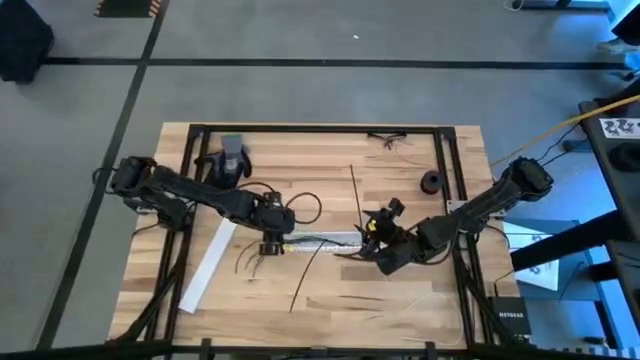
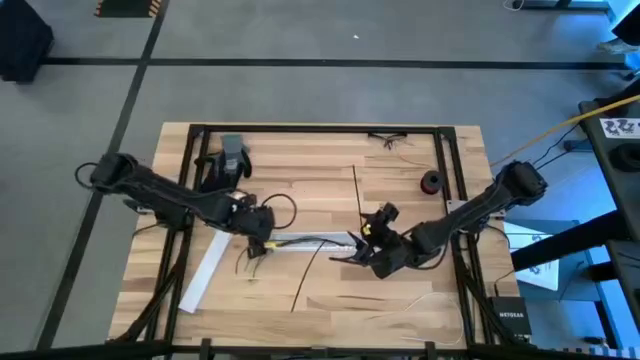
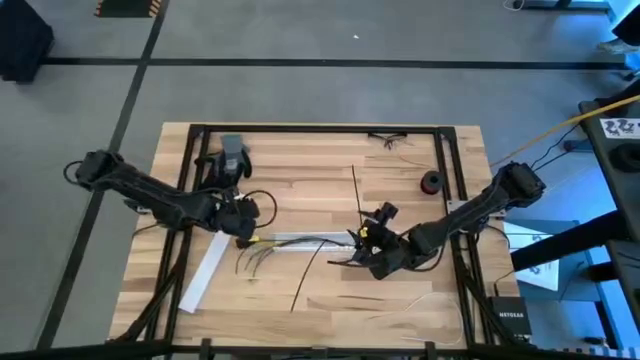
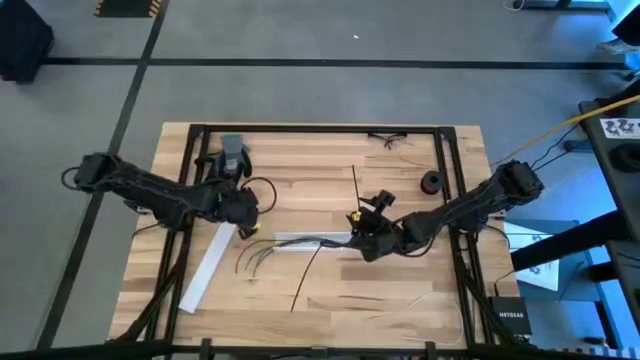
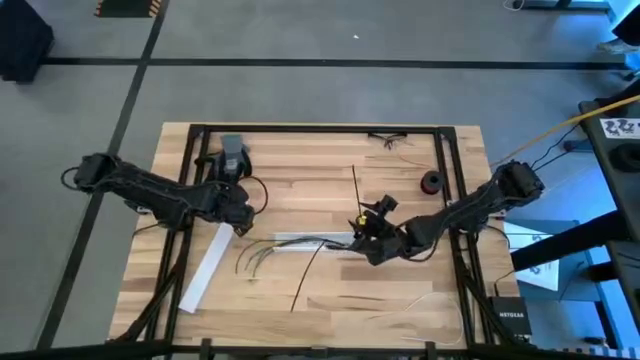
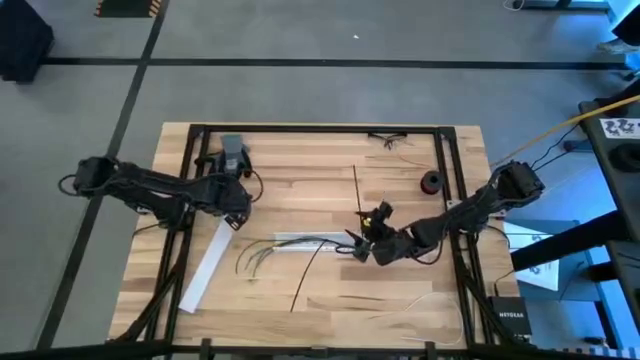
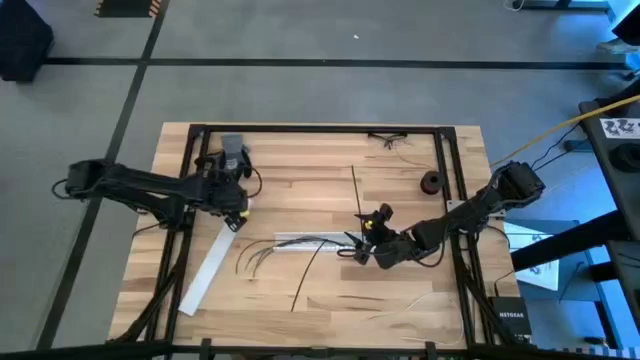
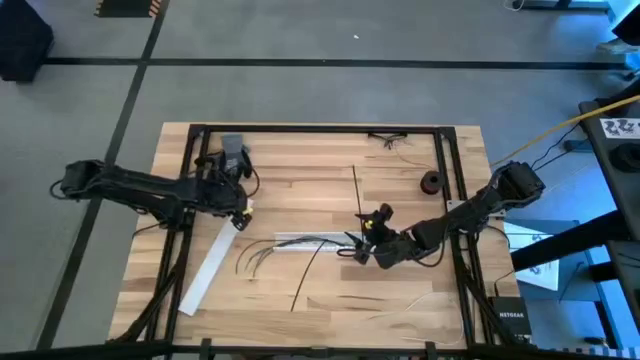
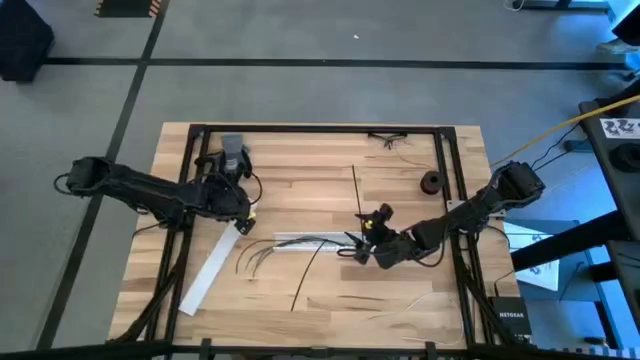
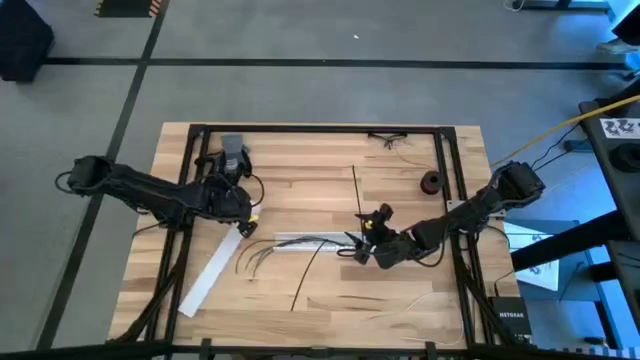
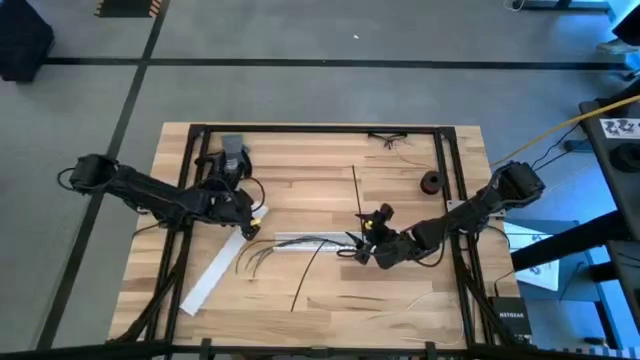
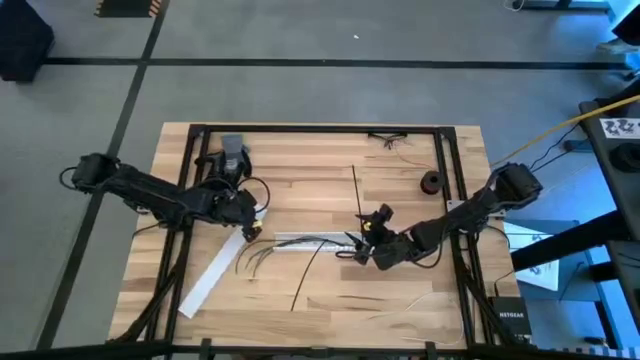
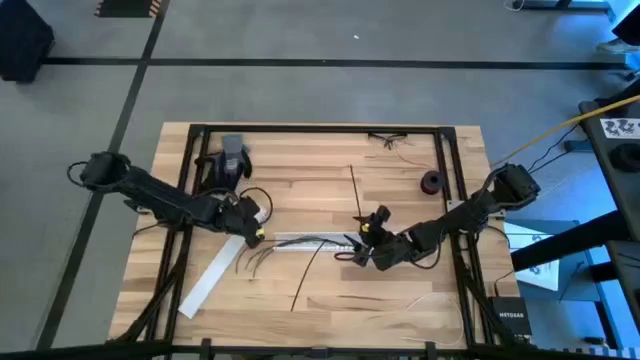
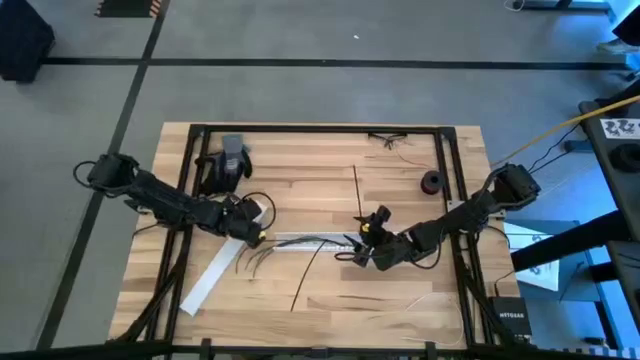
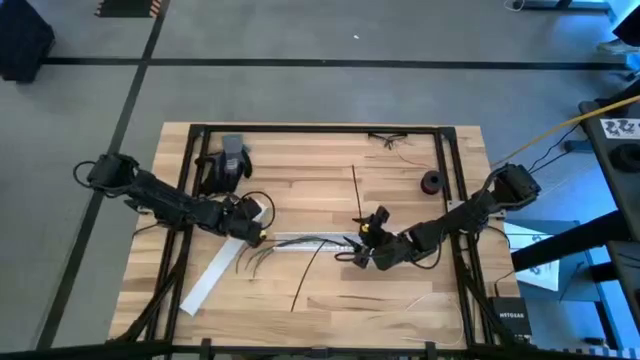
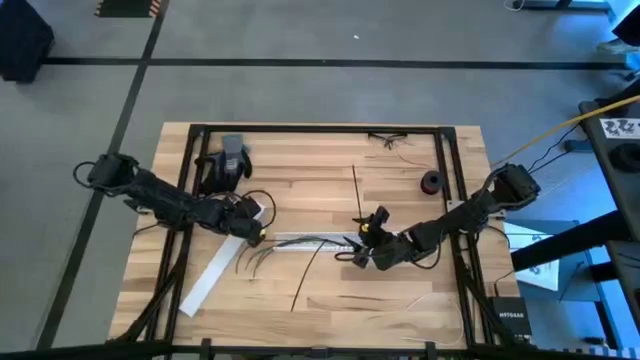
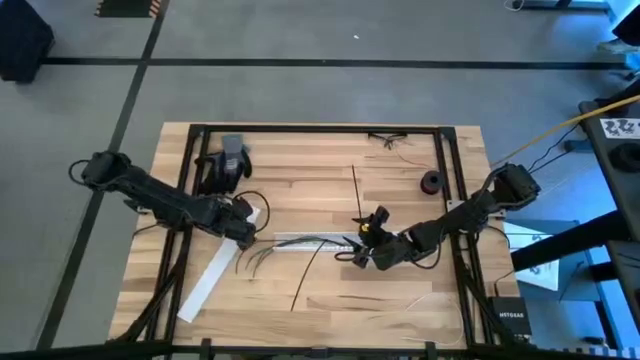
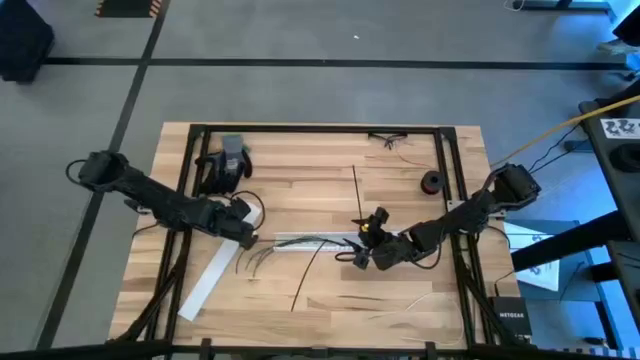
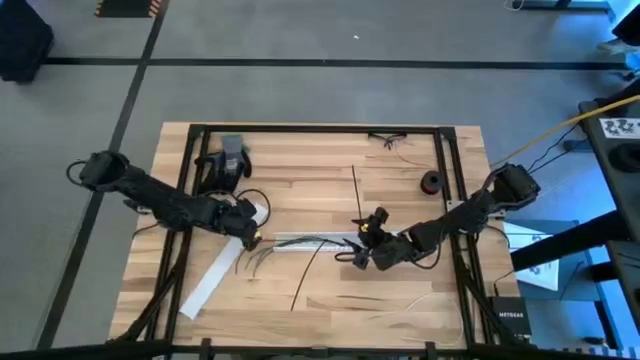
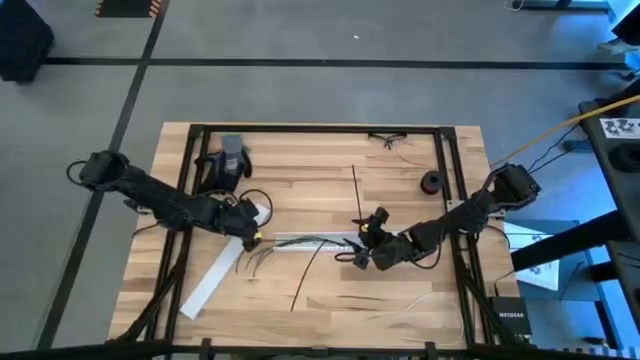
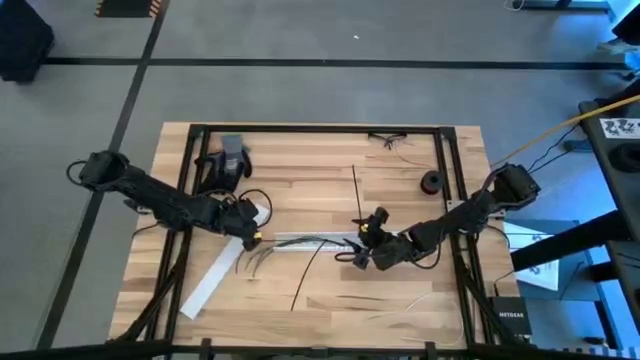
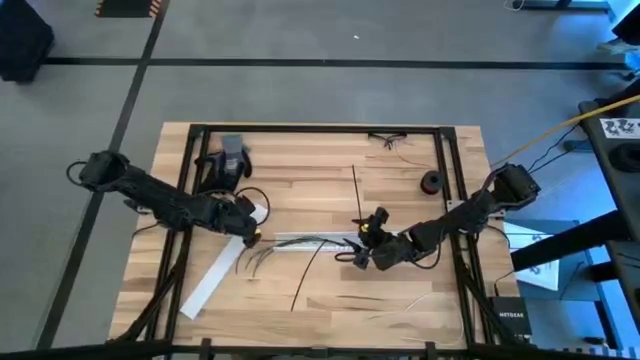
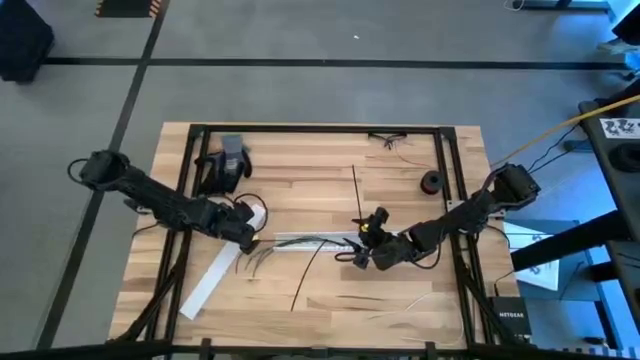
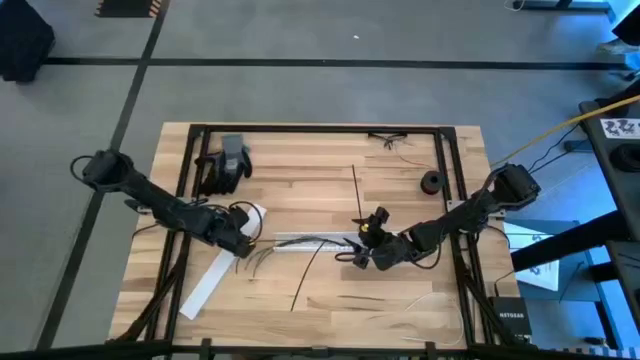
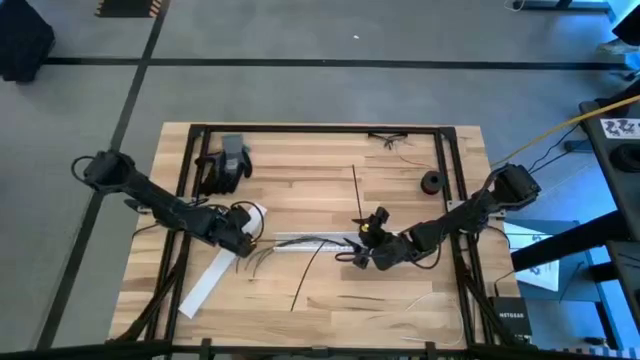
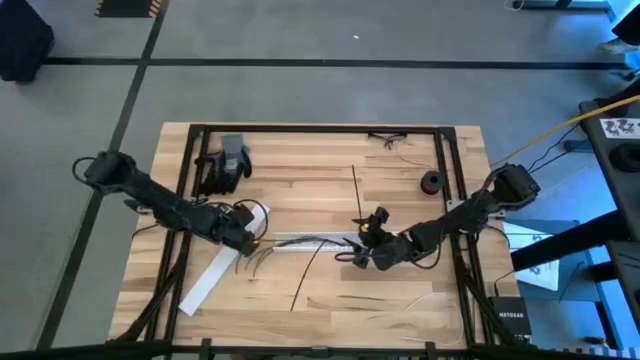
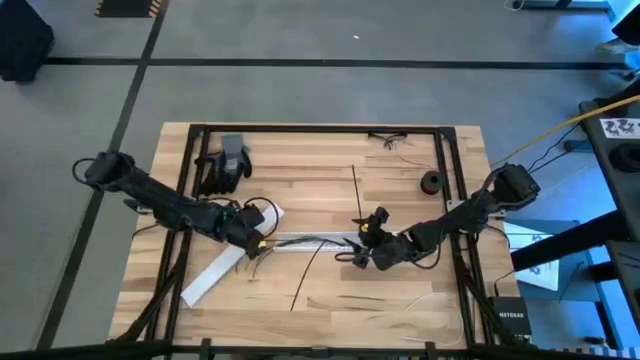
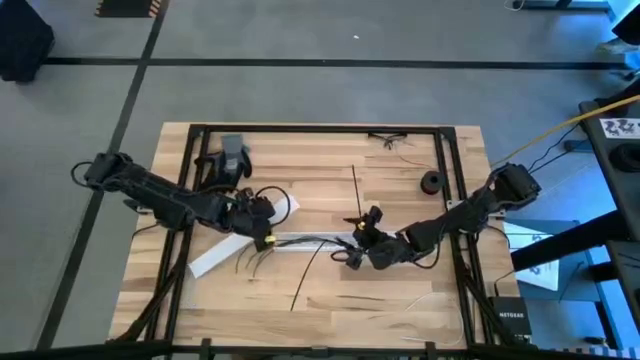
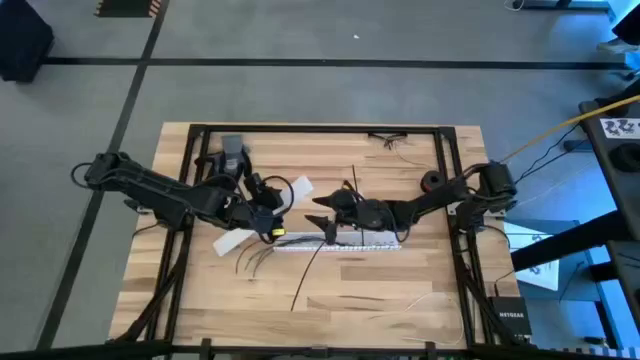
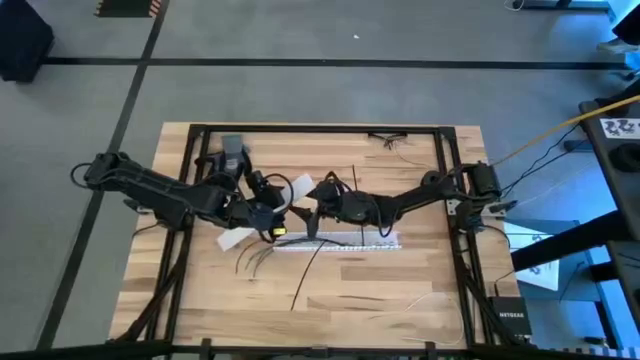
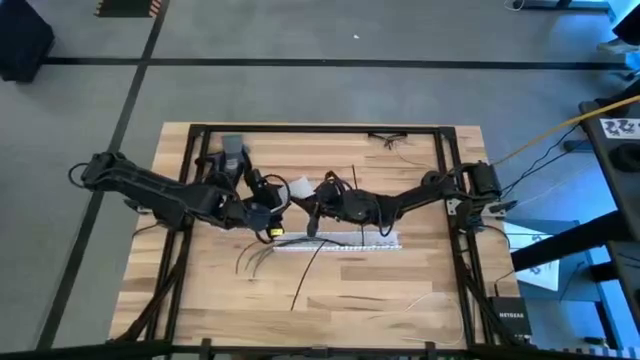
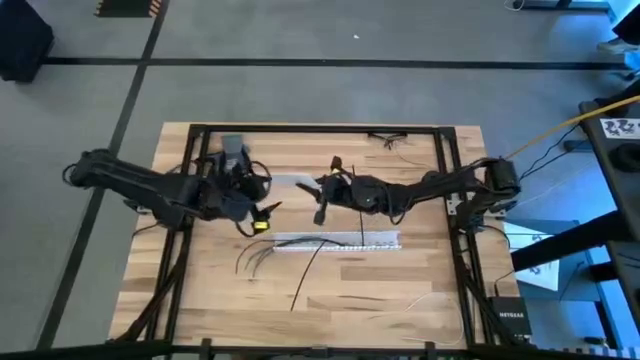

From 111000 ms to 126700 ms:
Task: Ziptie cables
Close the cable duct

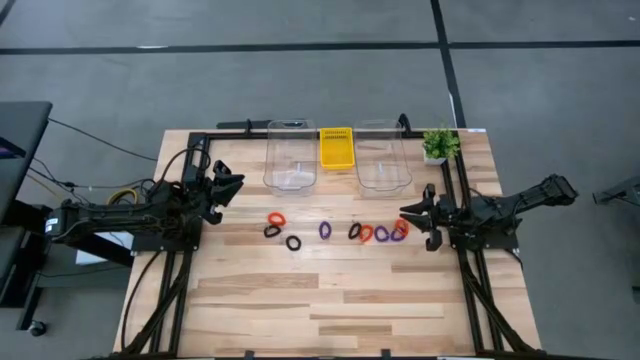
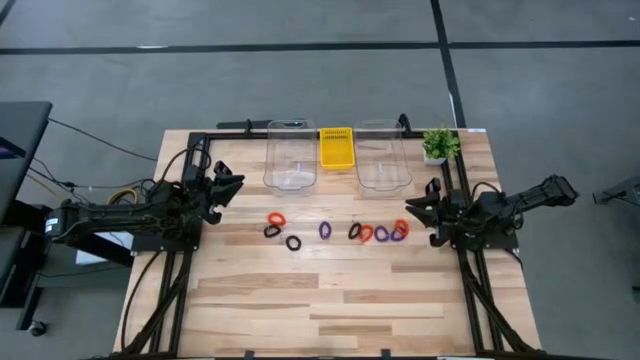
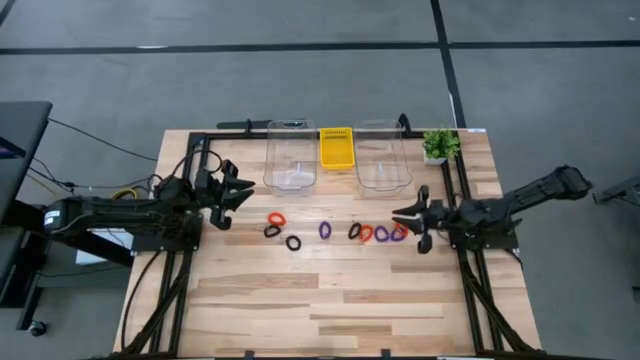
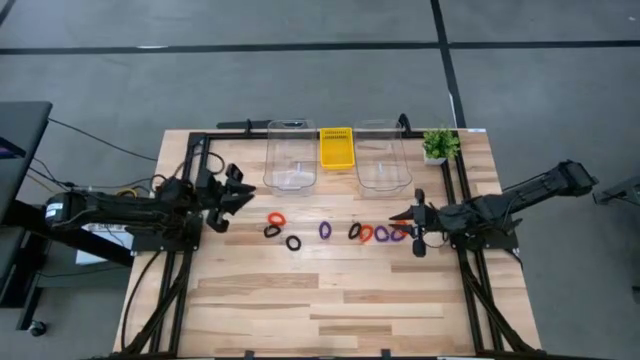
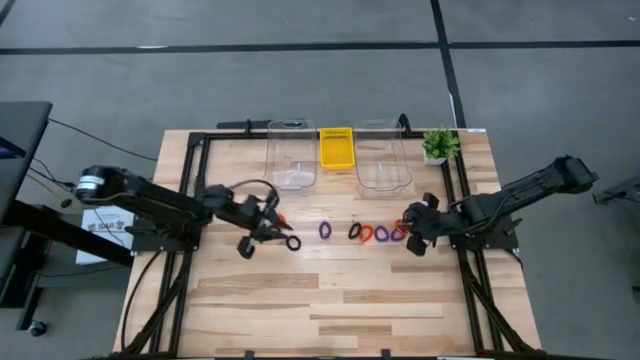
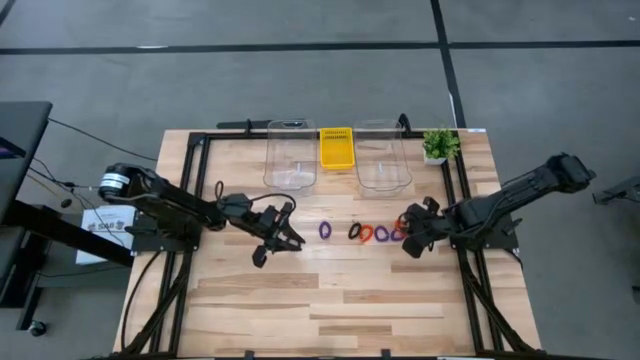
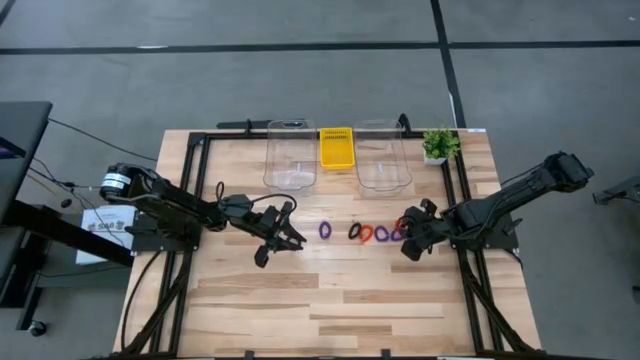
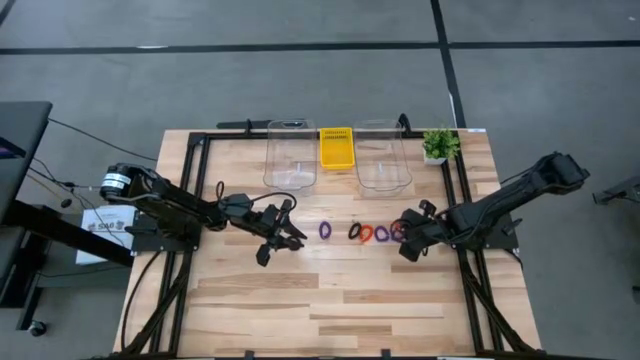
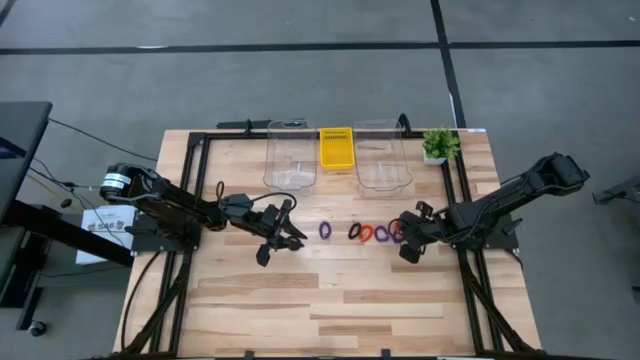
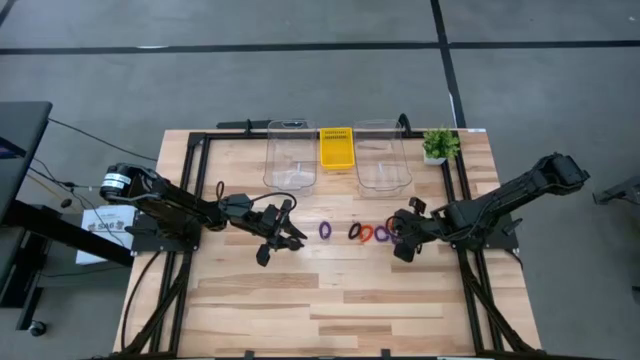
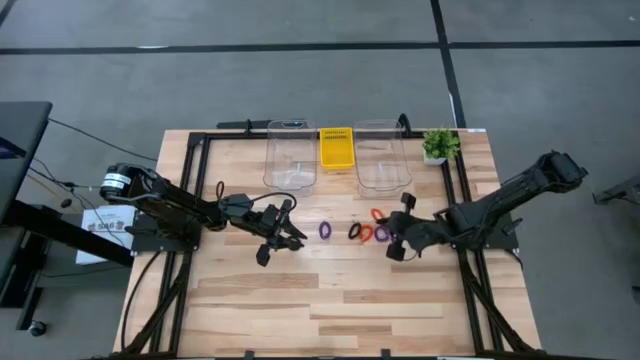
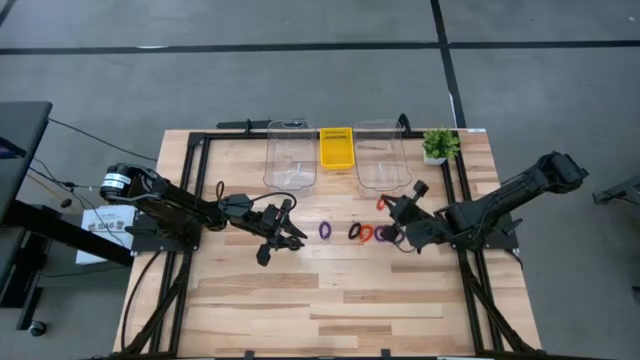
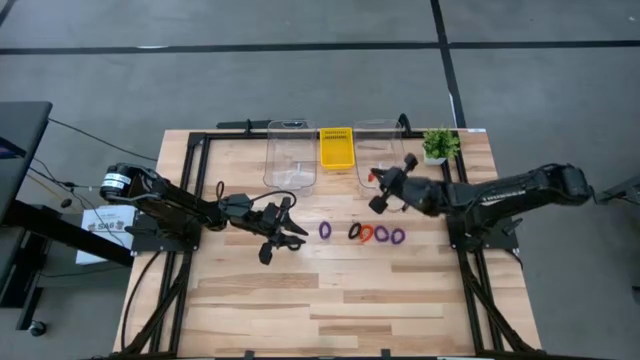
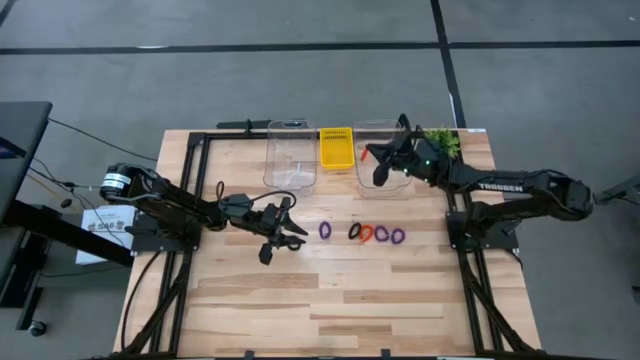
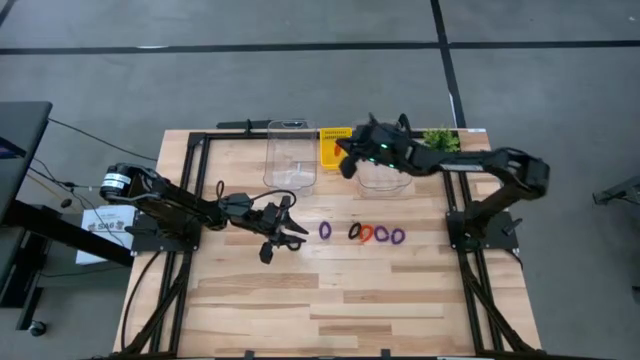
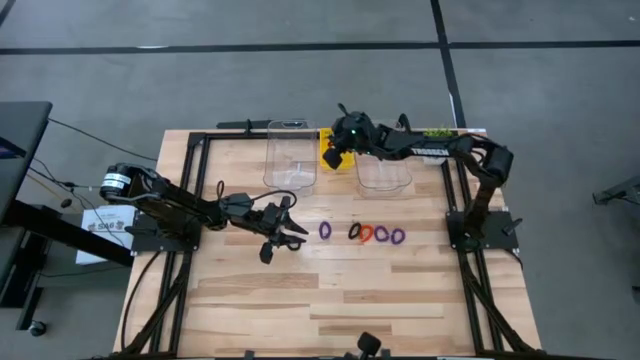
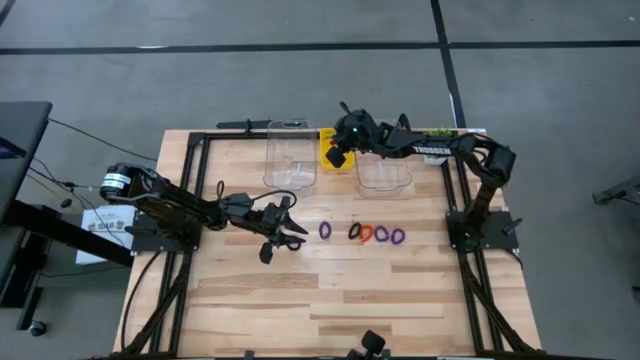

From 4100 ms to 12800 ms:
Task: Sort spring keychains
Put the right orange spring keychain into the yellow bin
